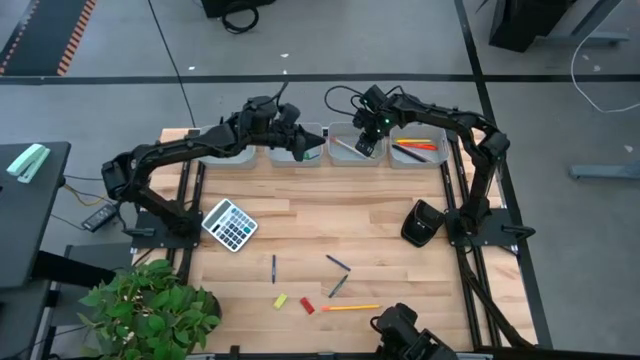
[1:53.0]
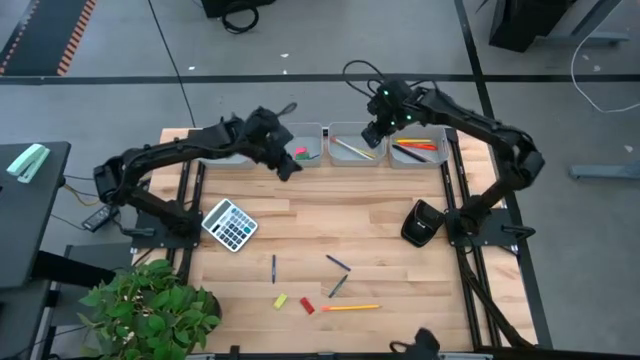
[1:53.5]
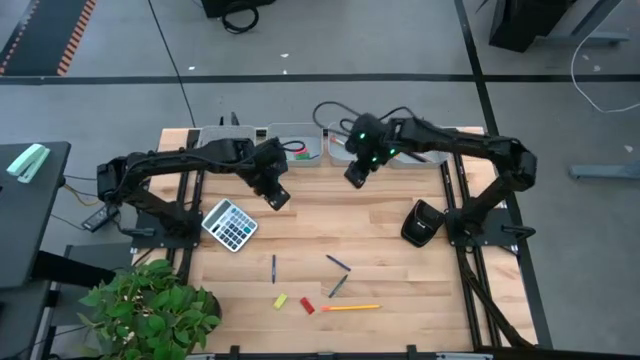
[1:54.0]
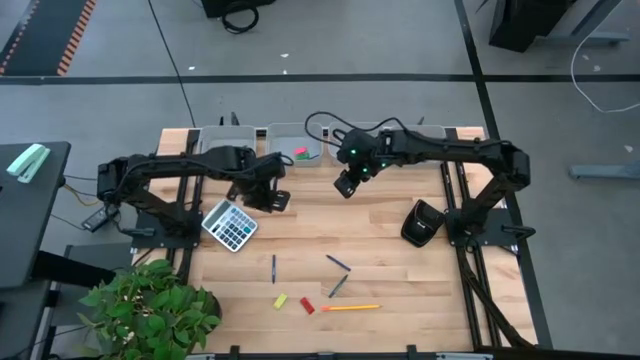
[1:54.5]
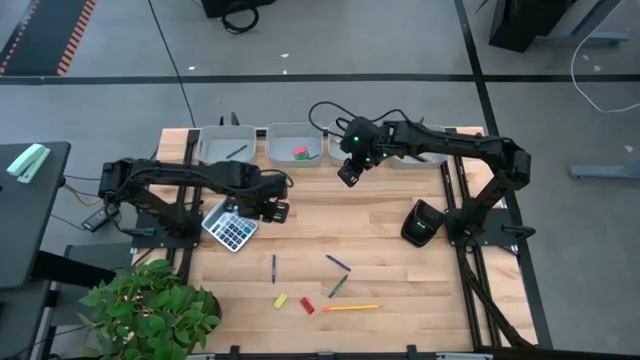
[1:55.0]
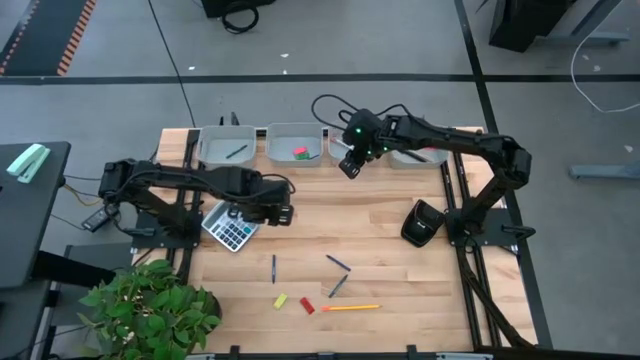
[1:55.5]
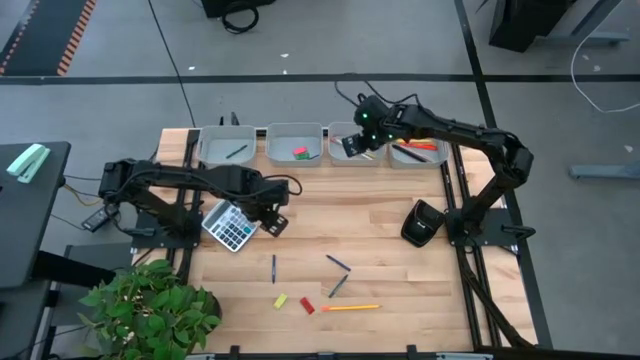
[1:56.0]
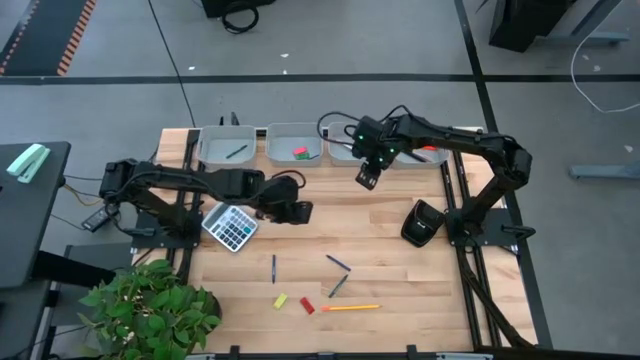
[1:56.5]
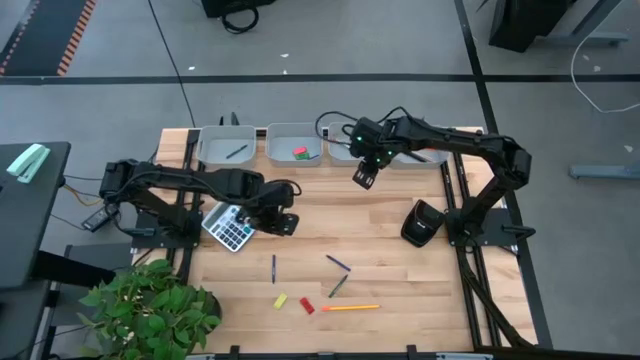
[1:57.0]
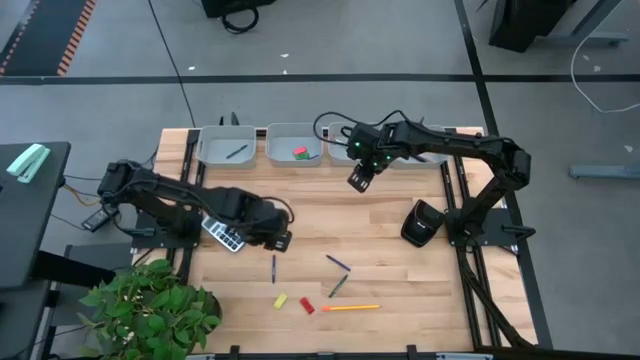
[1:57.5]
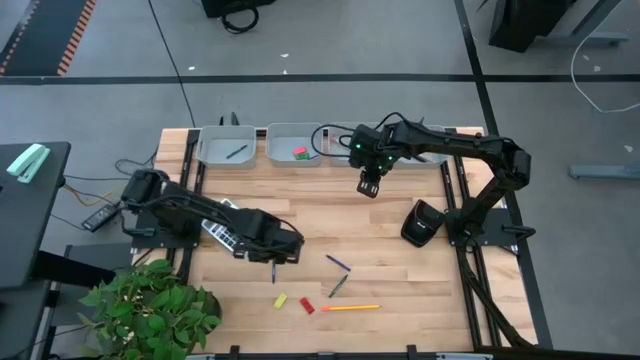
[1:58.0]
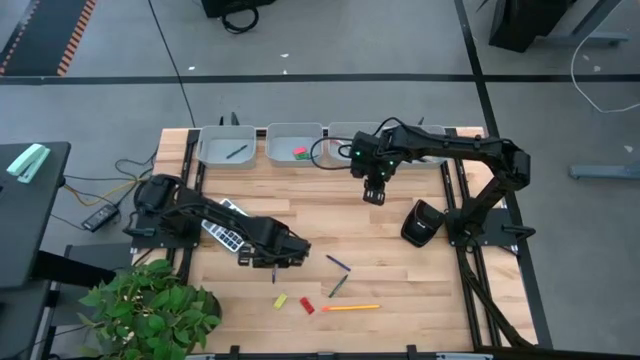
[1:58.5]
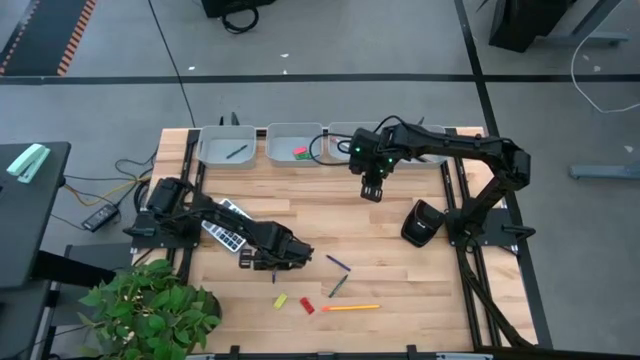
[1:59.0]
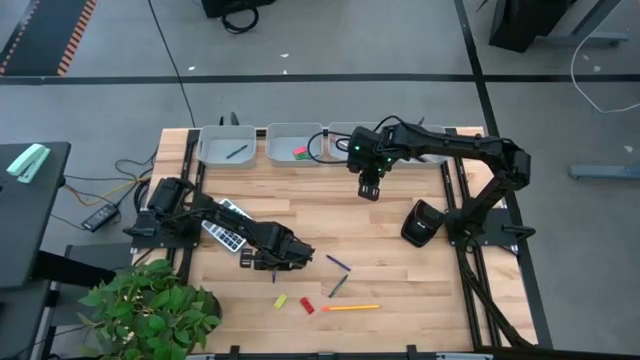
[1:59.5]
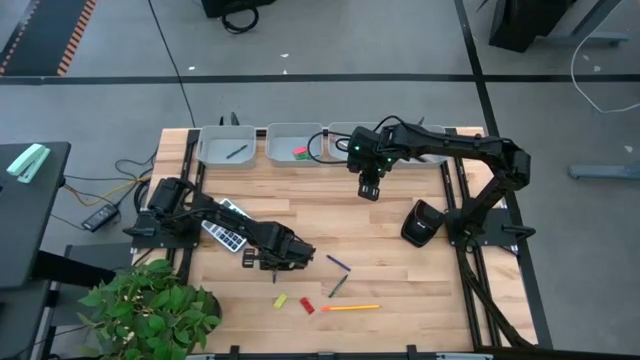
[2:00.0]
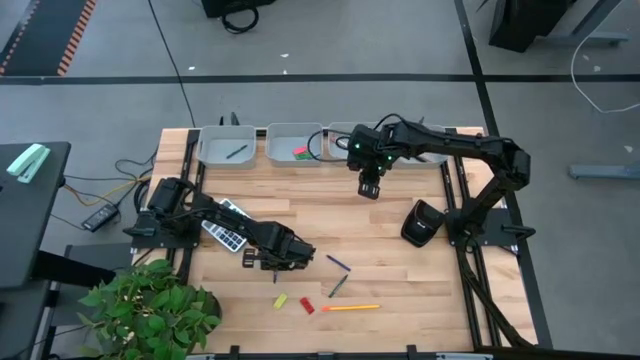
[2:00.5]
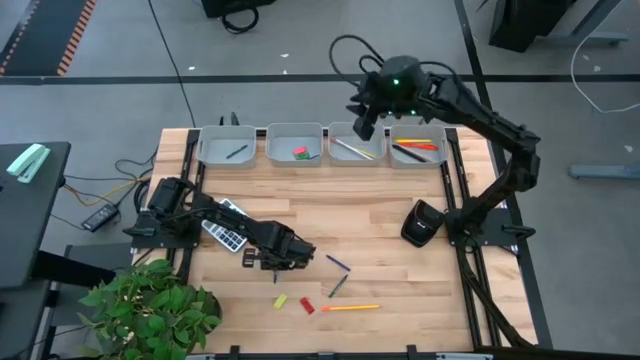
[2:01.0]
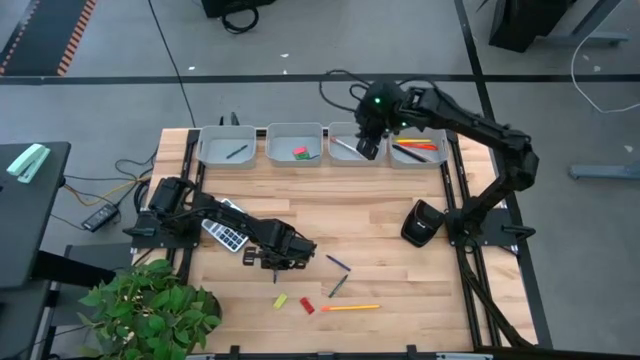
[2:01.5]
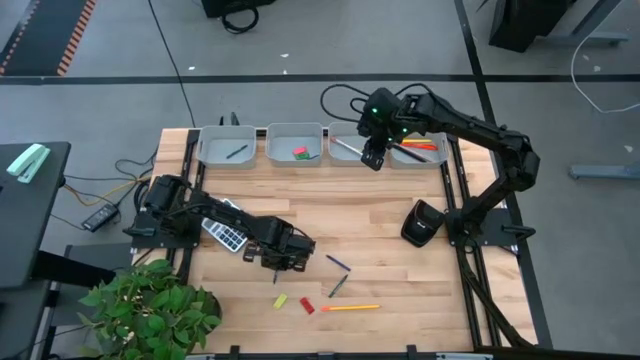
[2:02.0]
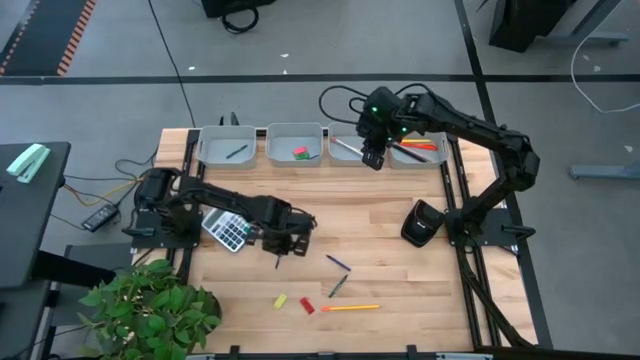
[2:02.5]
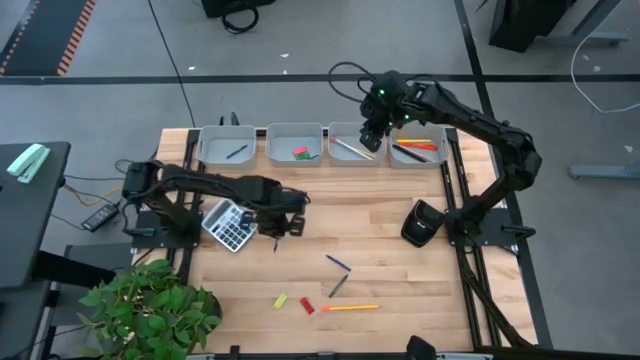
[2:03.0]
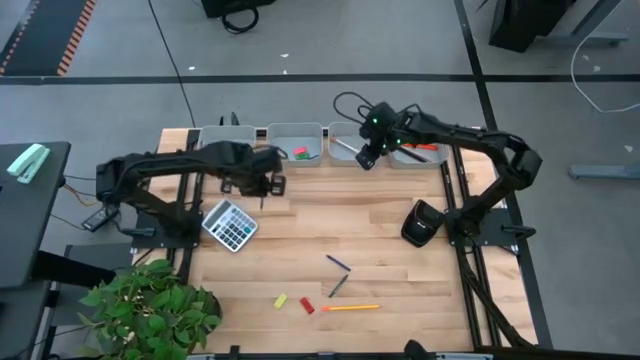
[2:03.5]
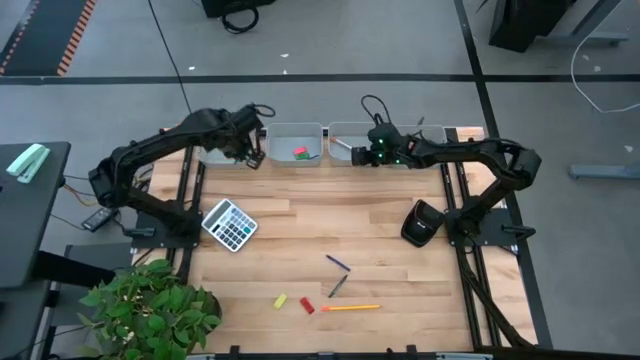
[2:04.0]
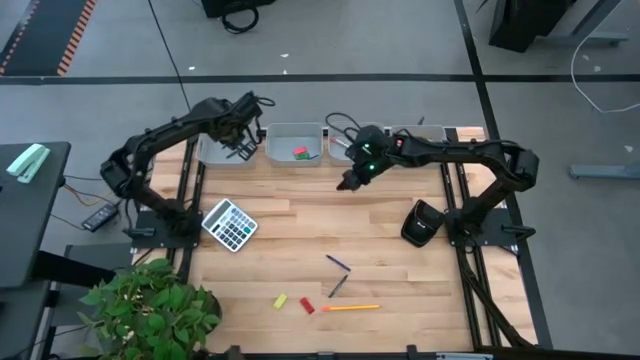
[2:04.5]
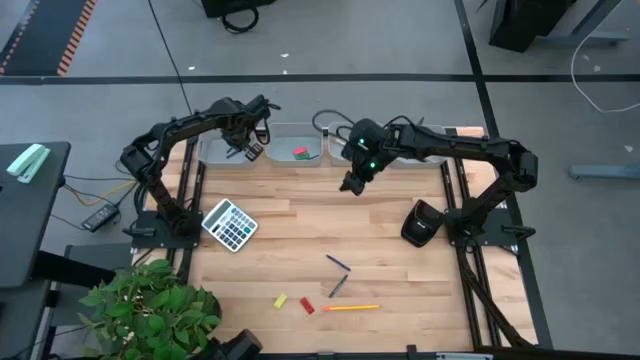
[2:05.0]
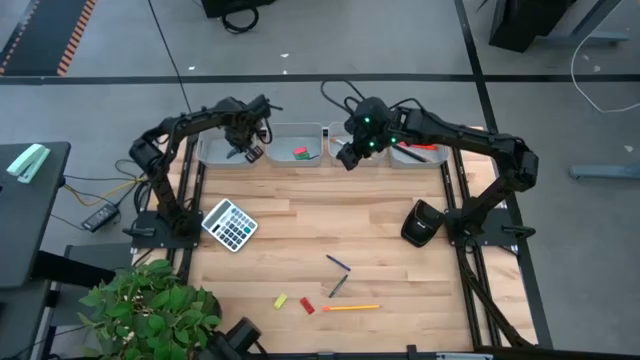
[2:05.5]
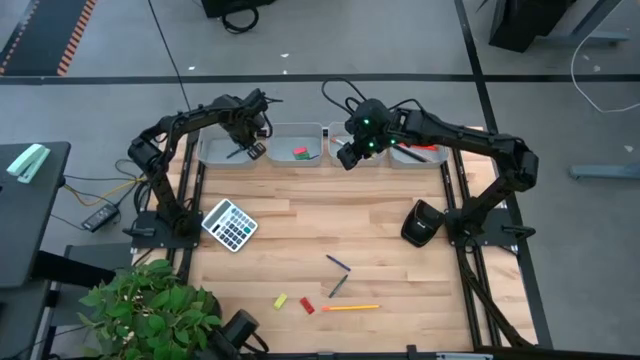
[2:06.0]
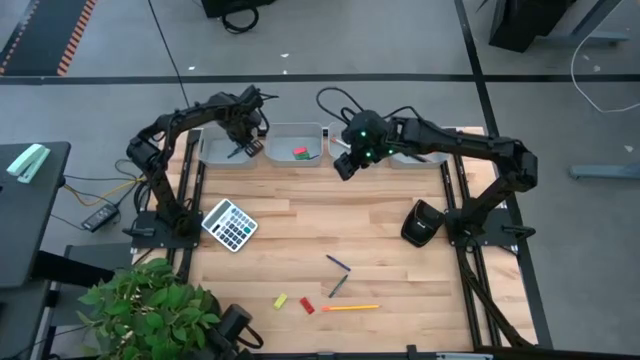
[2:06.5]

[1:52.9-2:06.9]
Task: Sort crayons/erasers/pens/pencils in bins
Put the left blue crayon into the gray bin

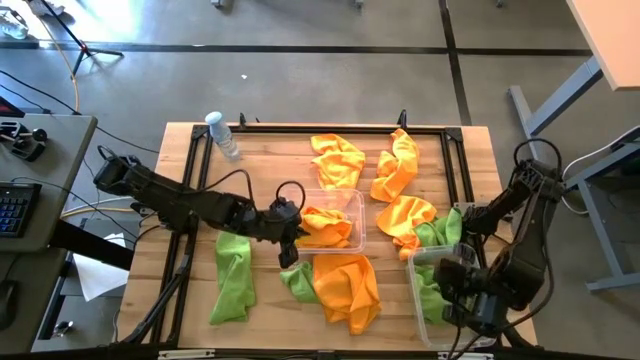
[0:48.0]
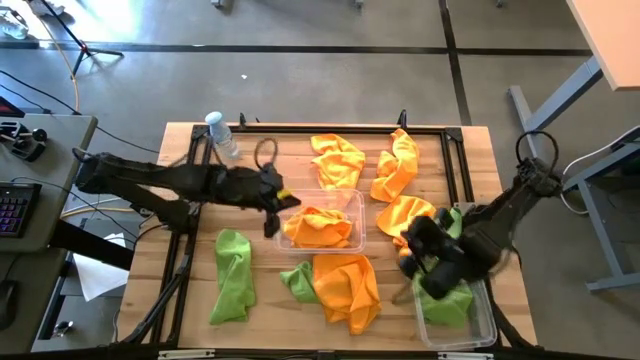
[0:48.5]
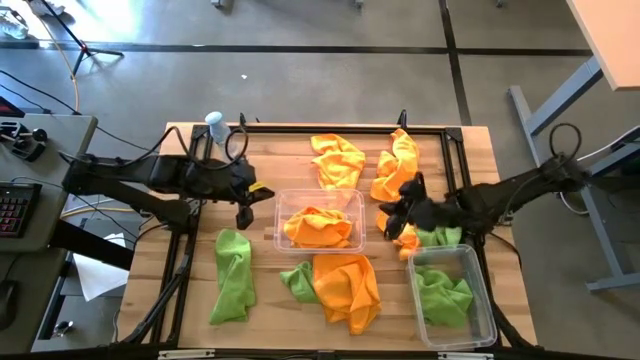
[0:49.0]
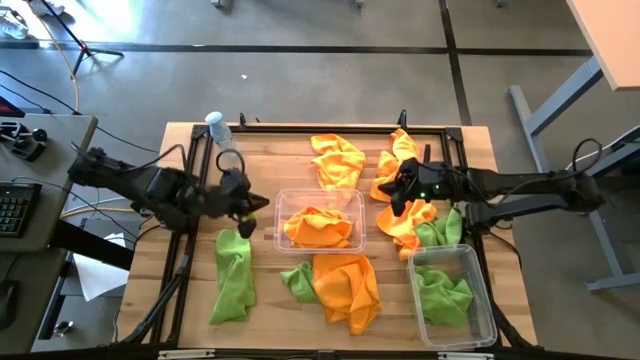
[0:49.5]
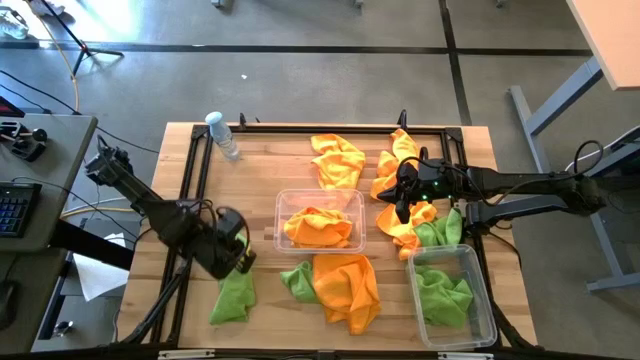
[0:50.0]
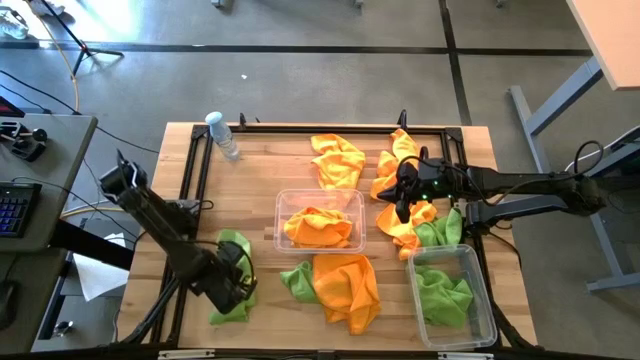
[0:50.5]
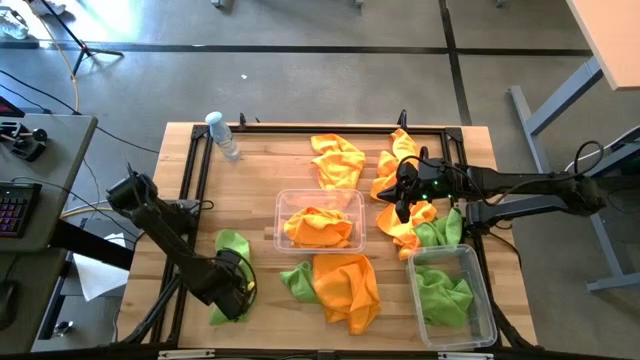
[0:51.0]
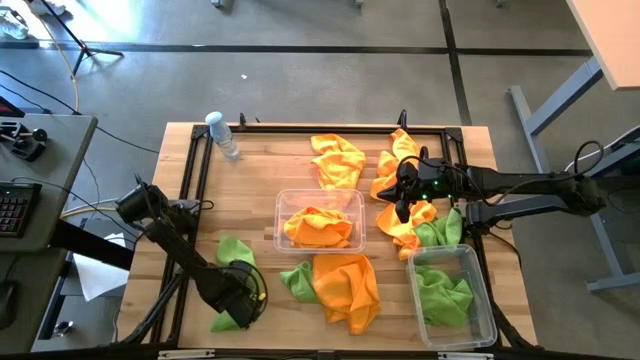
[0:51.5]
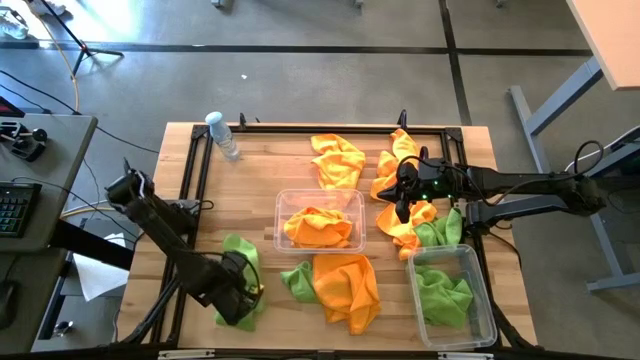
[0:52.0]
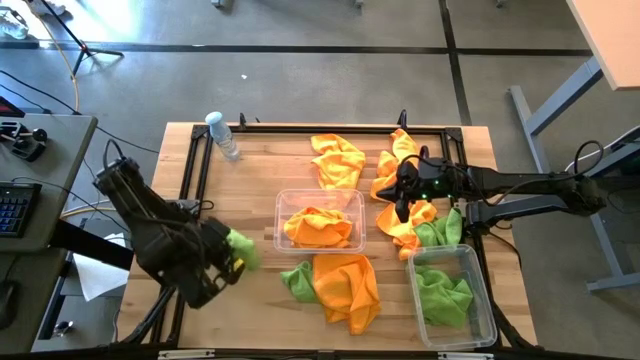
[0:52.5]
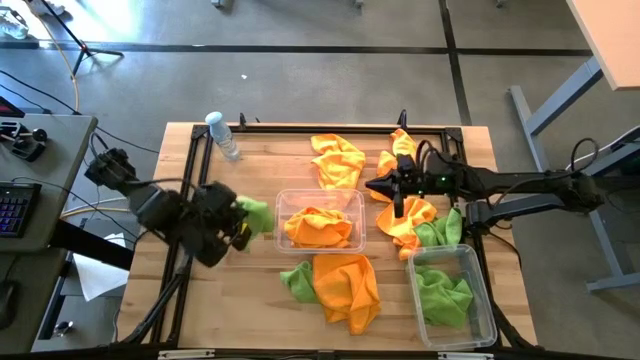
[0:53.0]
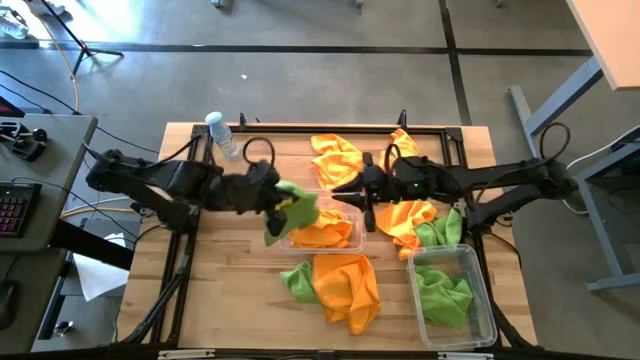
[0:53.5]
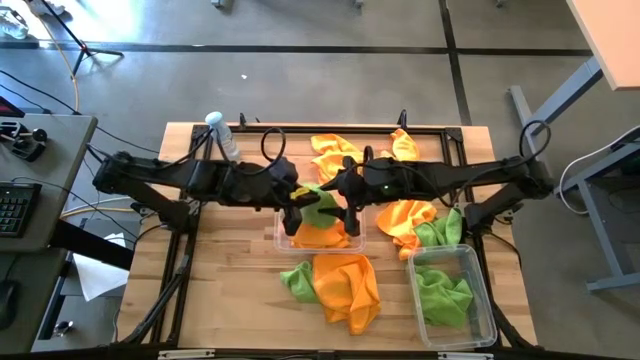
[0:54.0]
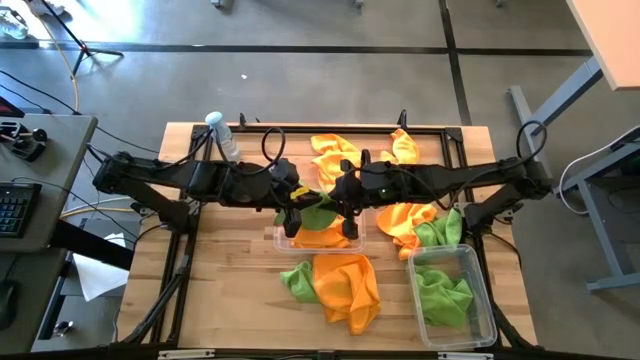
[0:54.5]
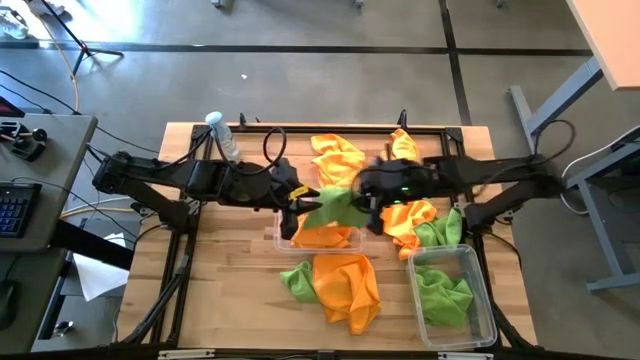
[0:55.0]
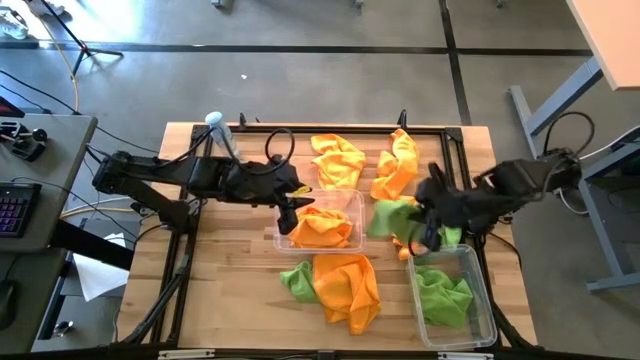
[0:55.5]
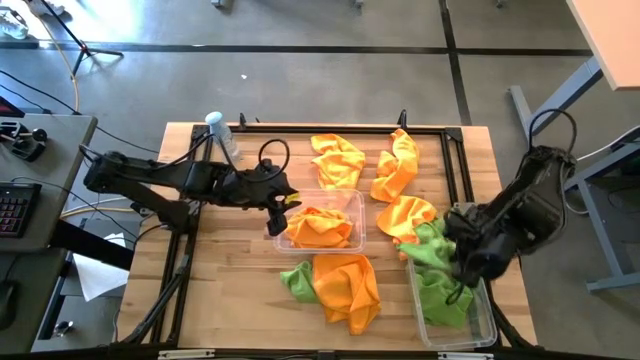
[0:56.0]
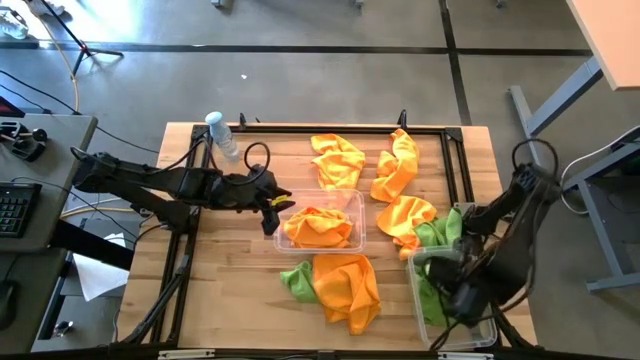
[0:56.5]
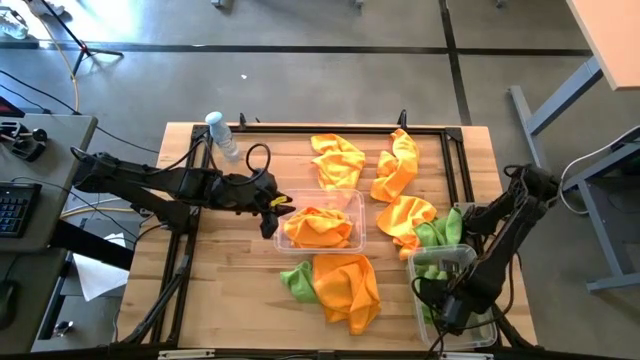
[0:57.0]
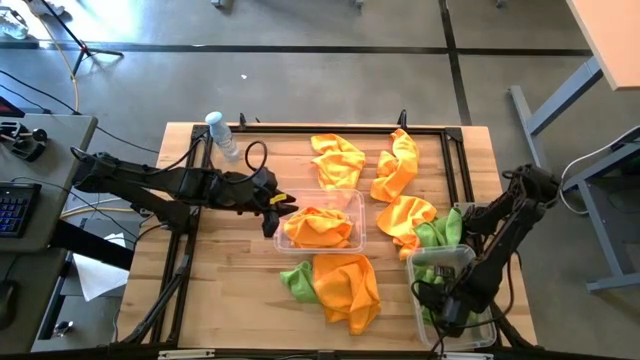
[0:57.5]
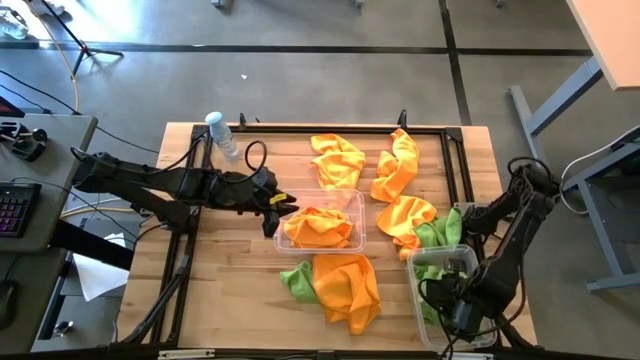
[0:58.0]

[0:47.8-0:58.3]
Task: Sort microfiber towel by color & place in baskets
Put the green towel into the bottom transparent bin
